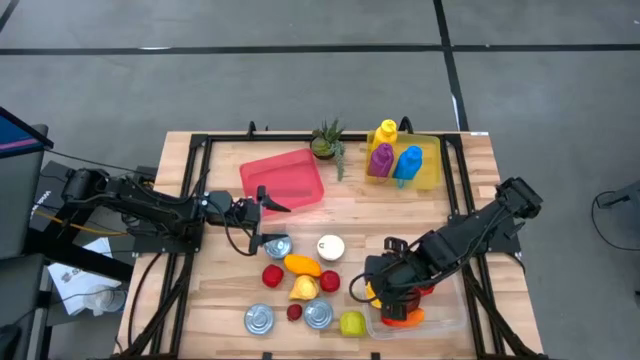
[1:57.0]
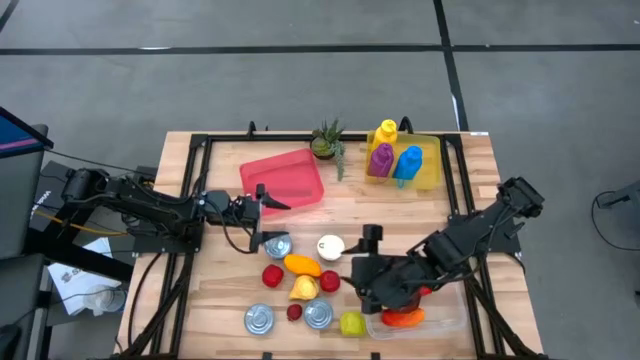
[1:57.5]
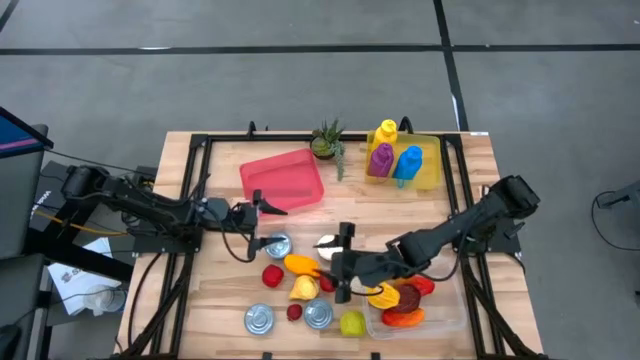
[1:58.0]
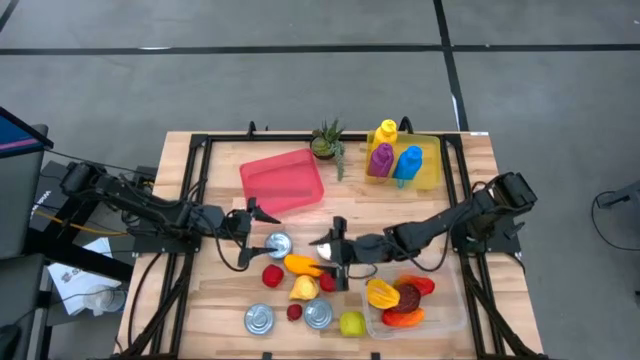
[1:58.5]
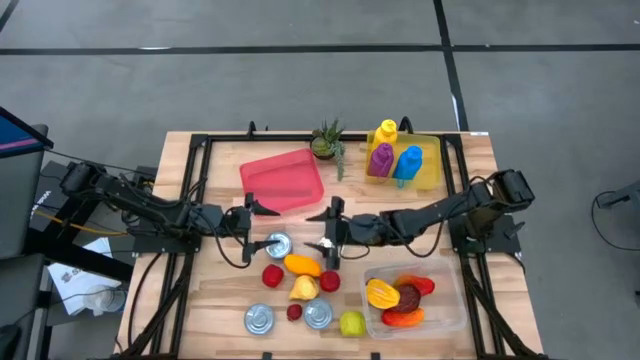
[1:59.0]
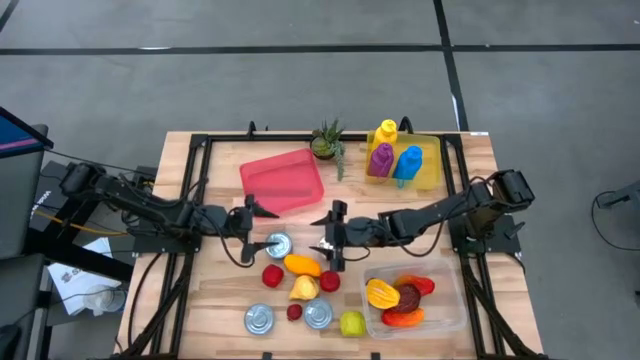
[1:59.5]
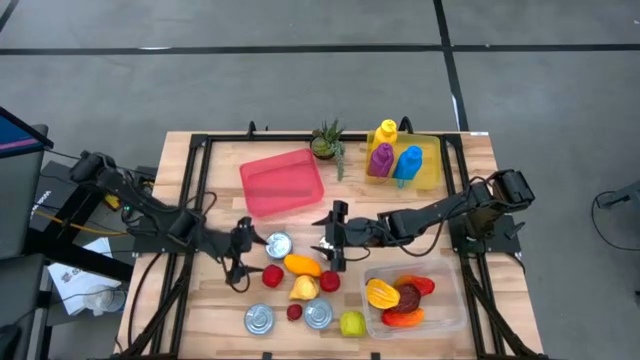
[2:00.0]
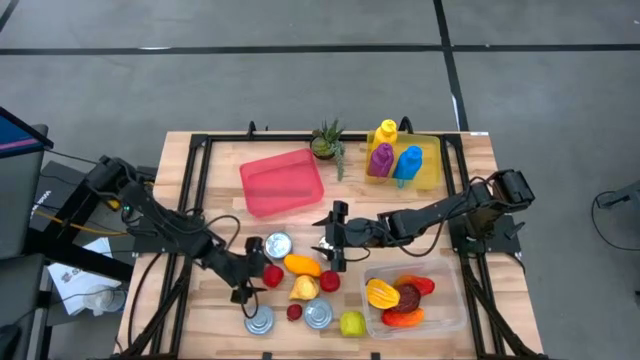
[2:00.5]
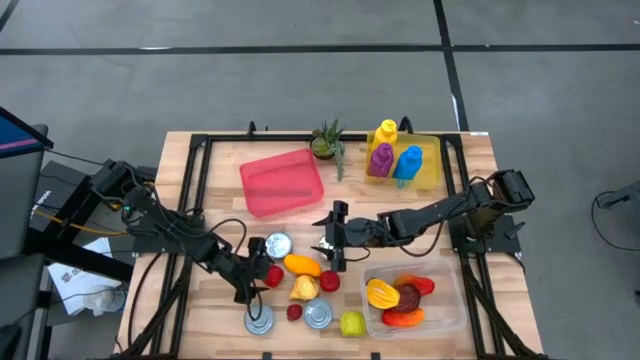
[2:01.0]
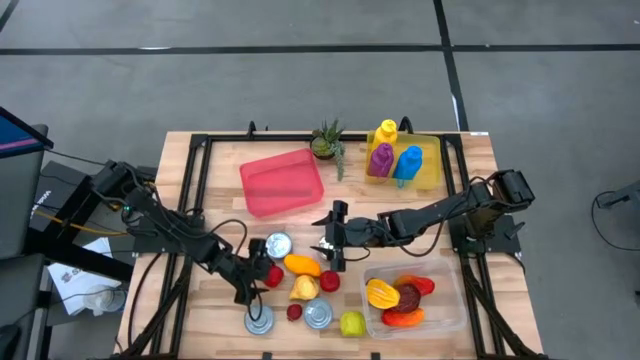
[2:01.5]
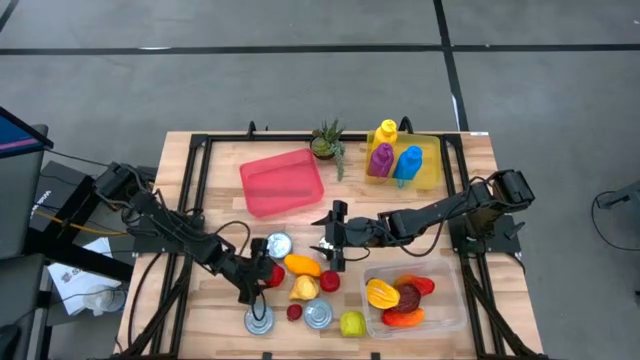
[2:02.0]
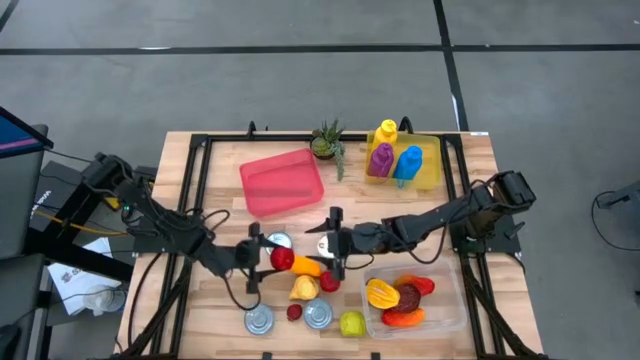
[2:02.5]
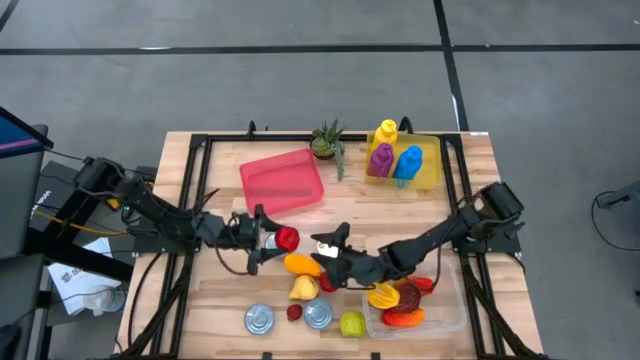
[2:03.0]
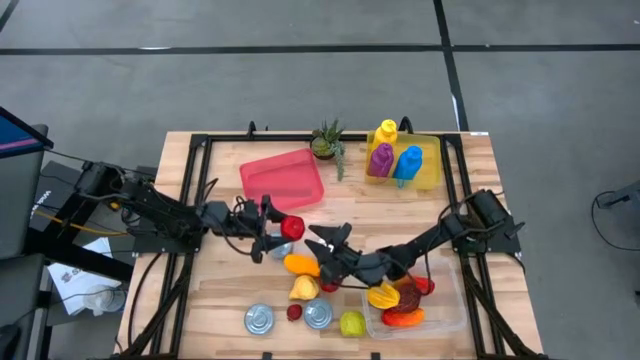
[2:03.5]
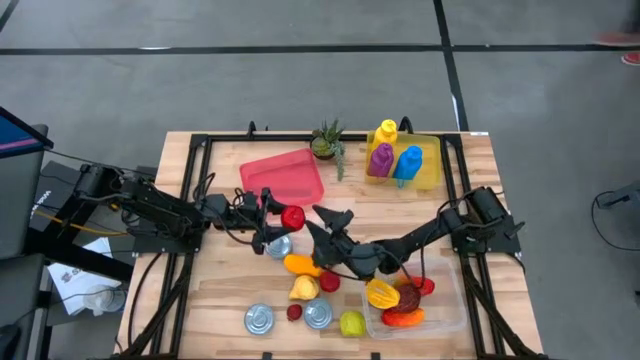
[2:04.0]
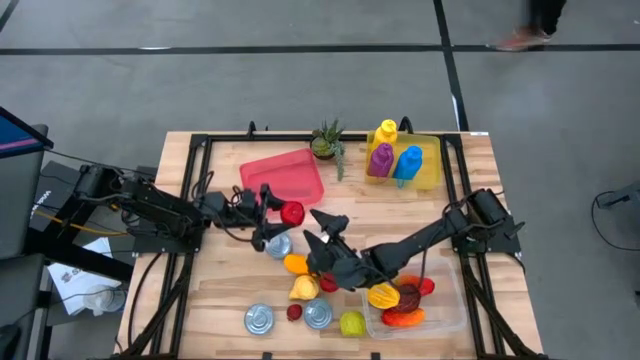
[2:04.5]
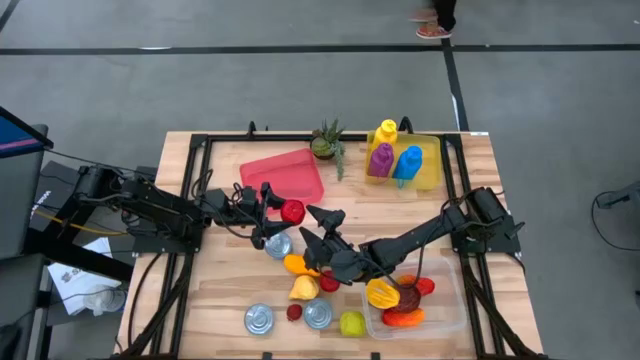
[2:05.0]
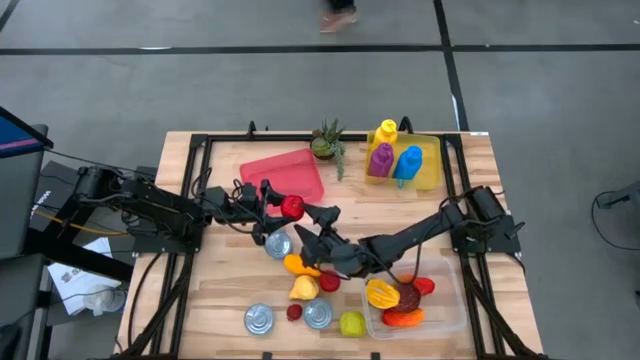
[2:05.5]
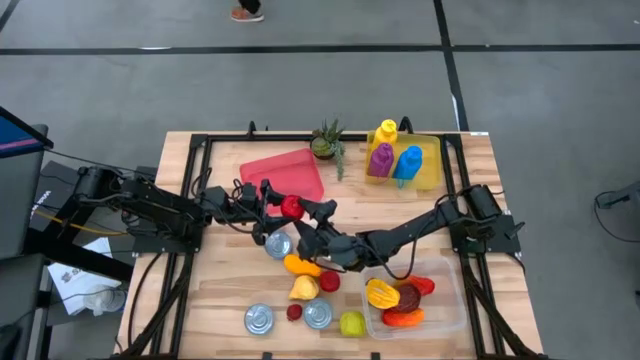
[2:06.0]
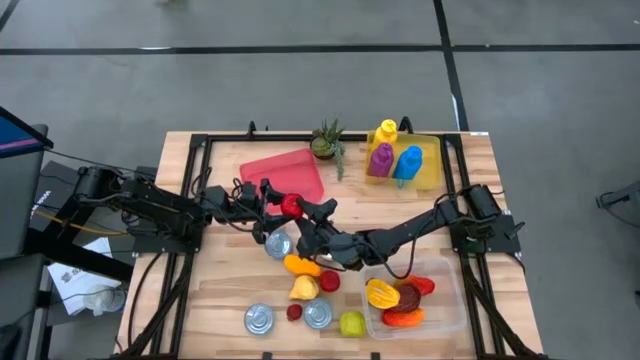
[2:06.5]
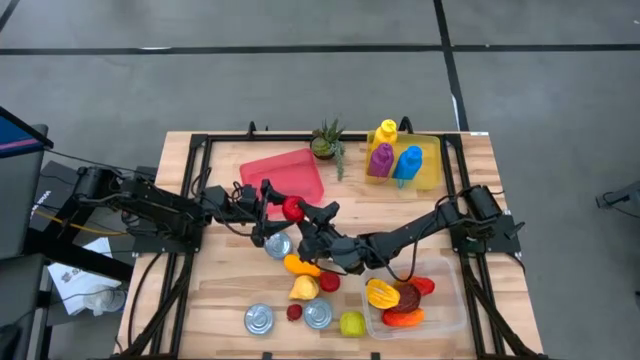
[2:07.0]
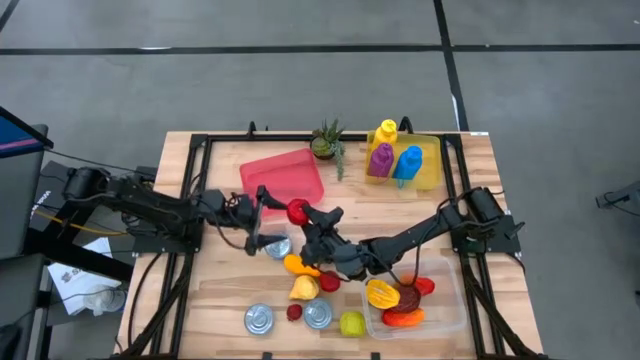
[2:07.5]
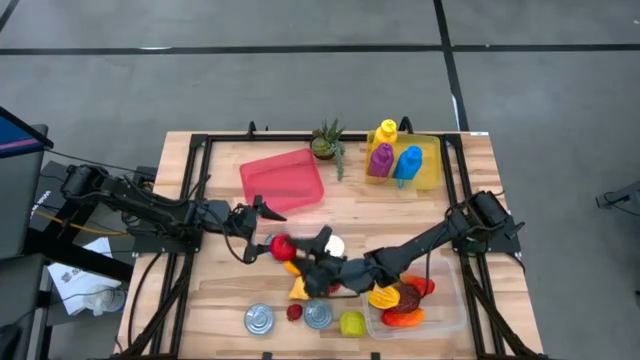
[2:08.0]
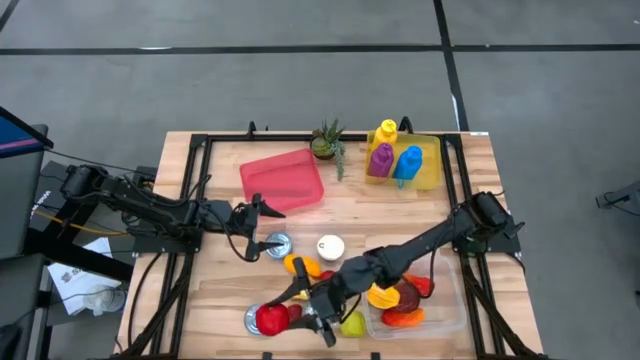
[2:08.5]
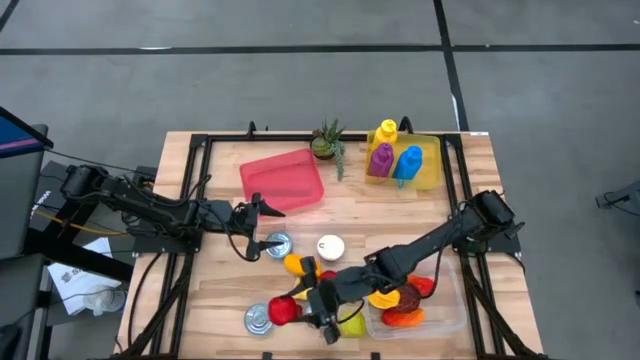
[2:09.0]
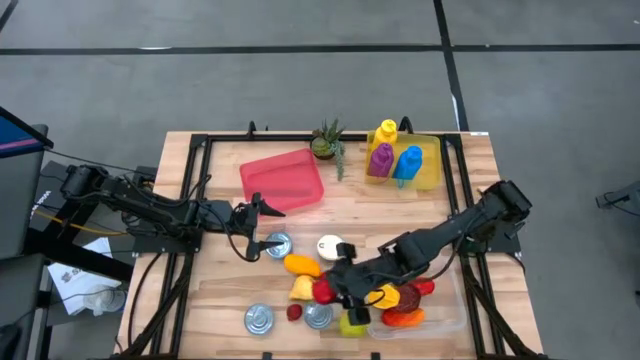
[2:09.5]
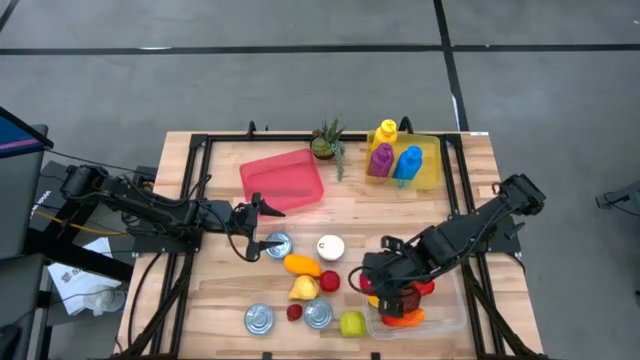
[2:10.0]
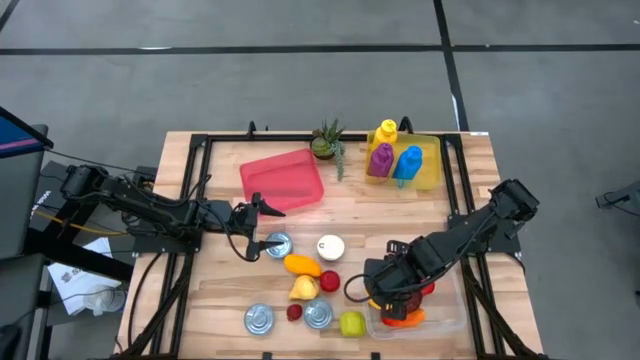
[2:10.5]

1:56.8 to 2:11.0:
Task: Pick & Place Food Item
Put the left red tomato into the transparent bin
